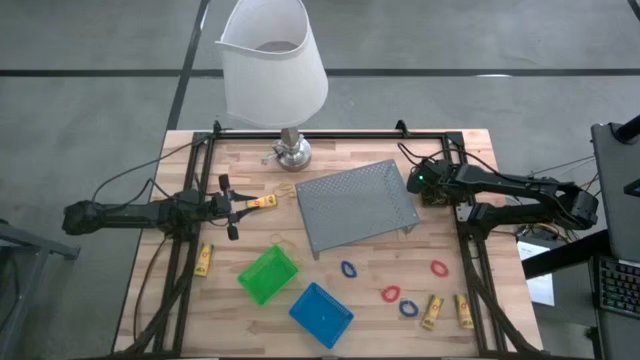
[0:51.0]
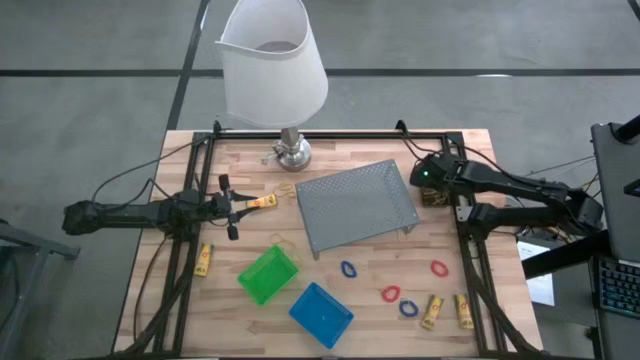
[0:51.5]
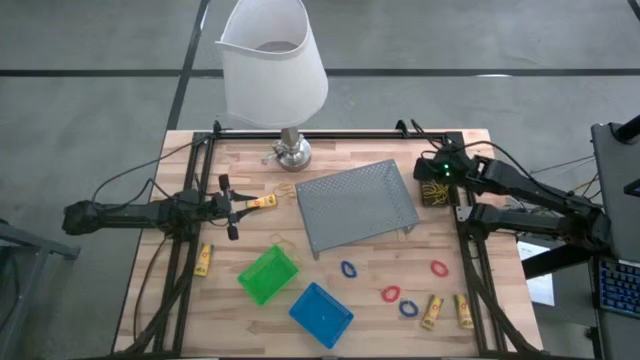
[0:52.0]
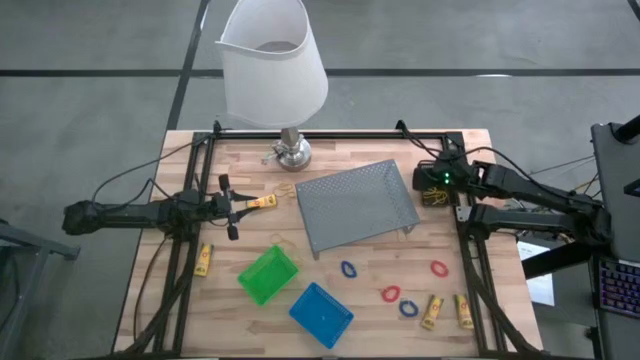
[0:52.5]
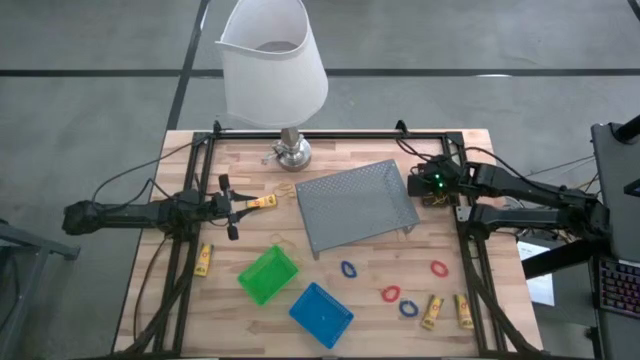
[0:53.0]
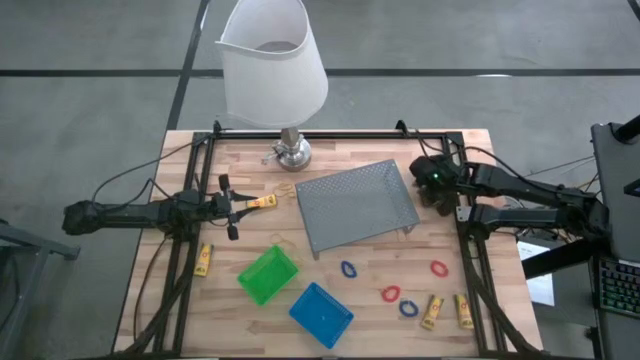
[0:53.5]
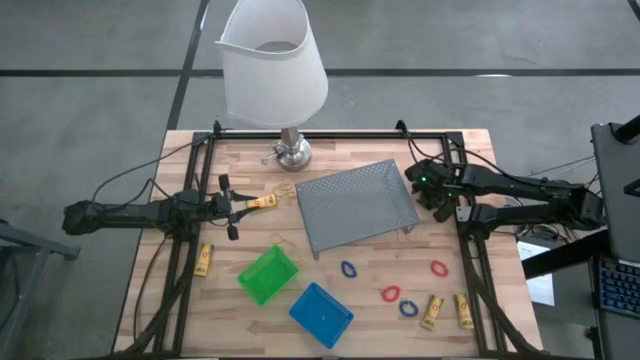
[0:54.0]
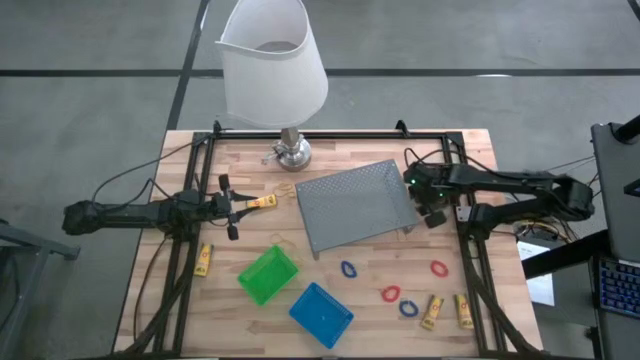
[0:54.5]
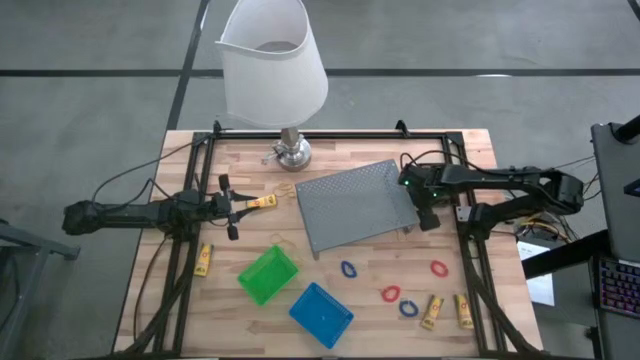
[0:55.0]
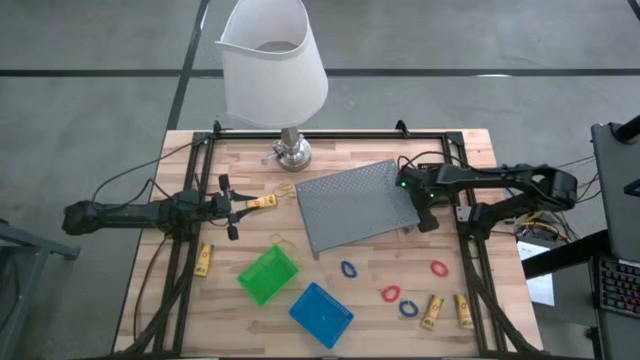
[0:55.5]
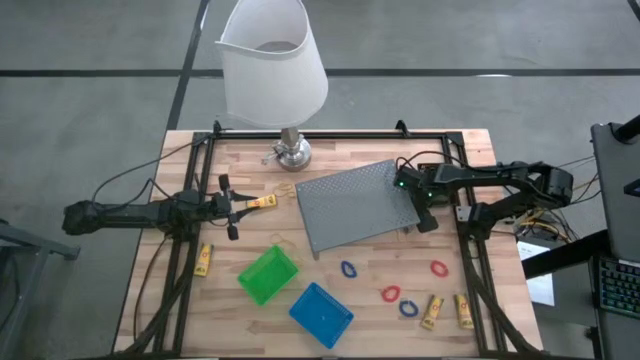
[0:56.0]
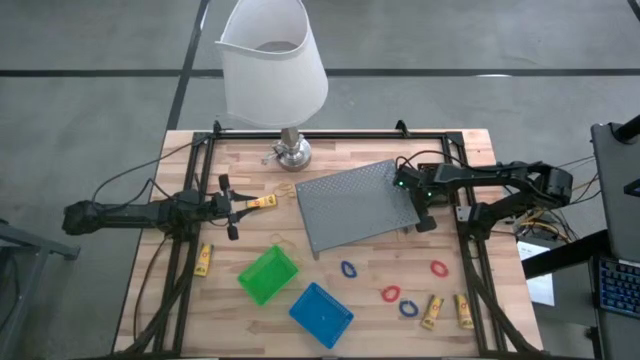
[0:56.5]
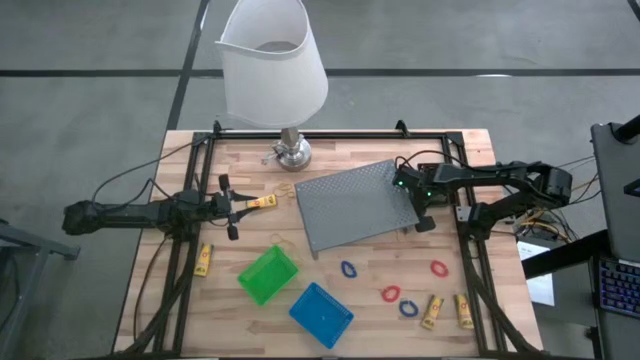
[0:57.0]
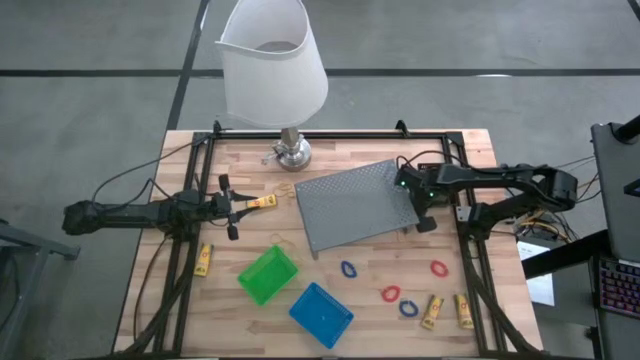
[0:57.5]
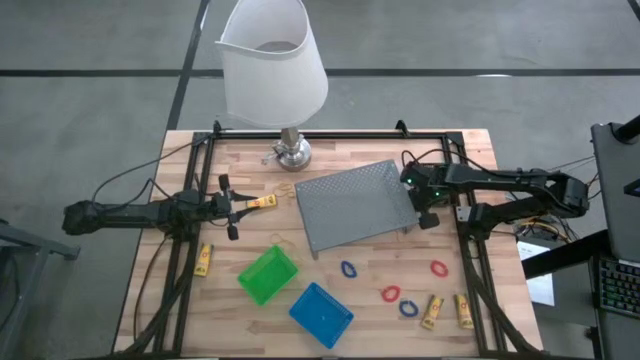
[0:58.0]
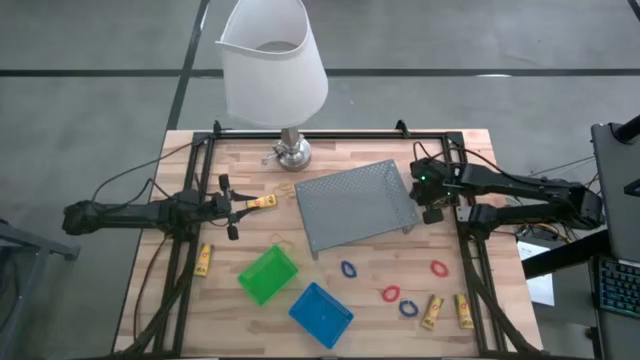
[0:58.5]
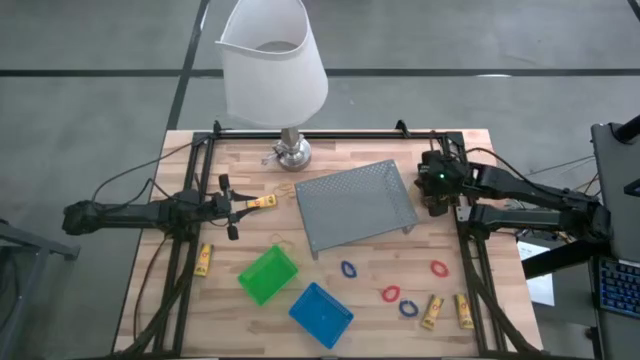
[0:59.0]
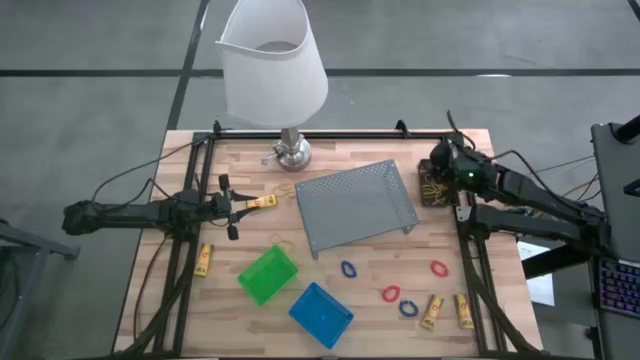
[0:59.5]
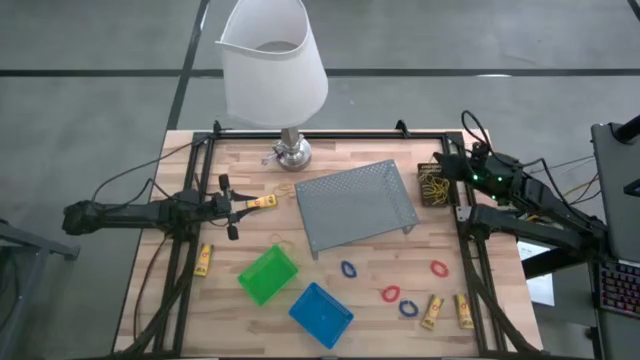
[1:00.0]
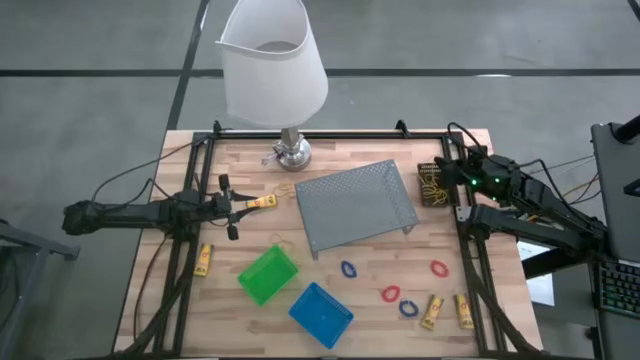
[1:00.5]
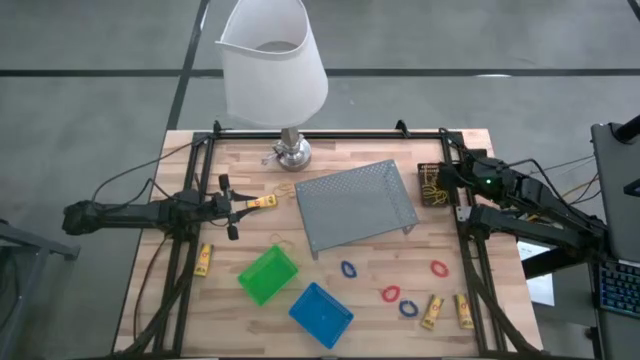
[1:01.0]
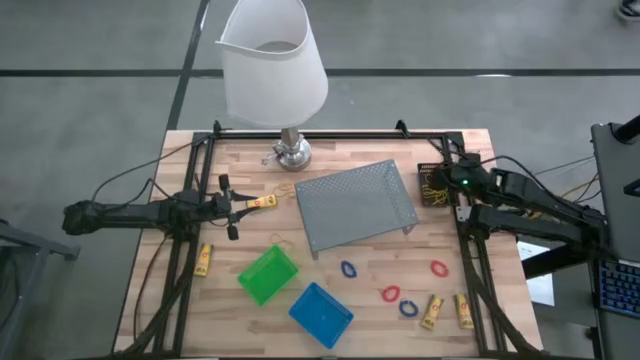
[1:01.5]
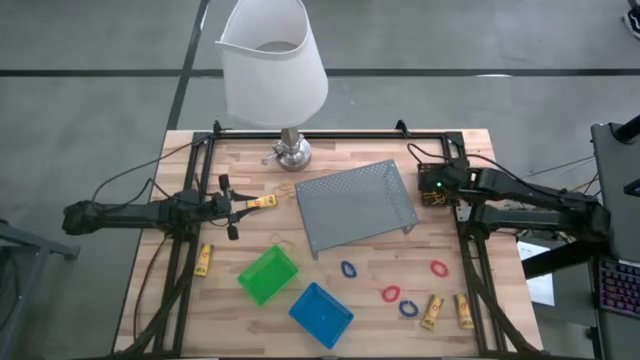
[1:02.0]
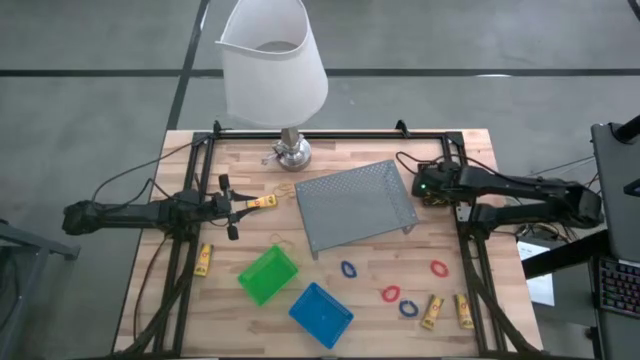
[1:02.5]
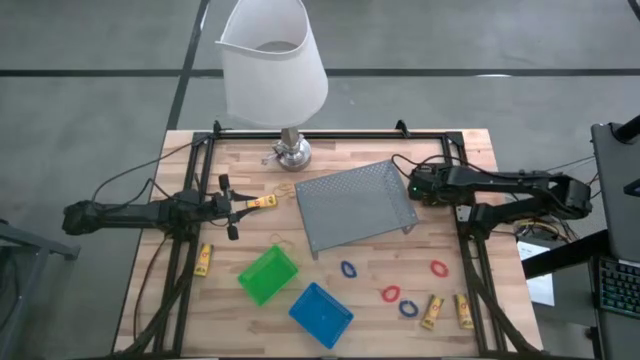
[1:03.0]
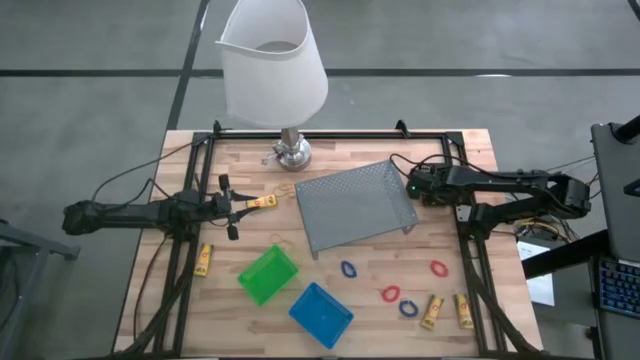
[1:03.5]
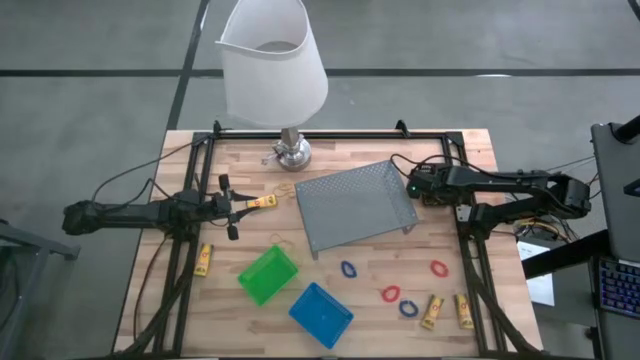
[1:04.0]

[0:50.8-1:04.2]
Task: Pick & Place Office Desk Supplies
Put the yellow rubber band into the black basket

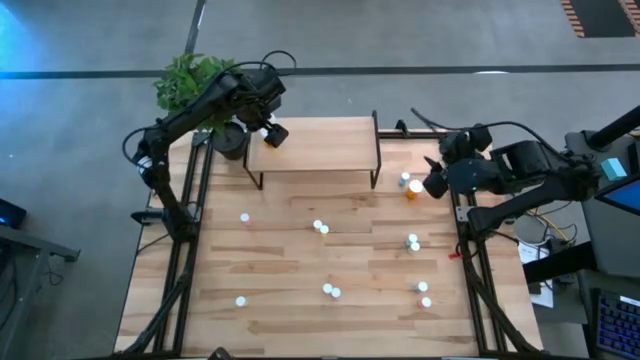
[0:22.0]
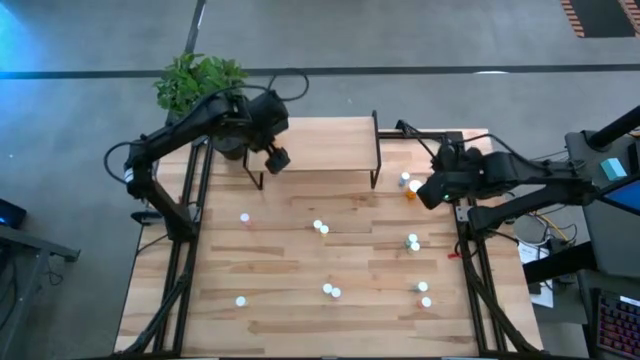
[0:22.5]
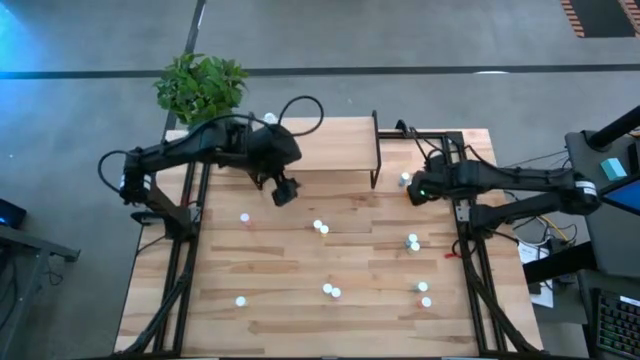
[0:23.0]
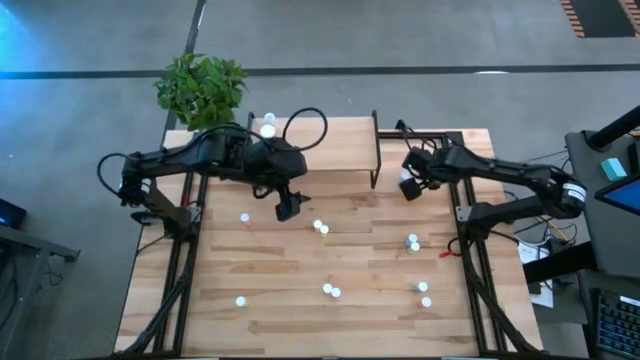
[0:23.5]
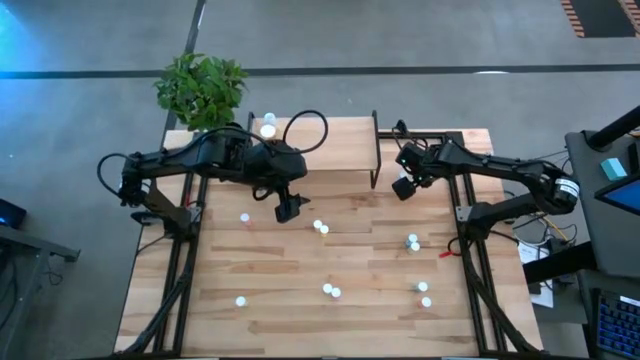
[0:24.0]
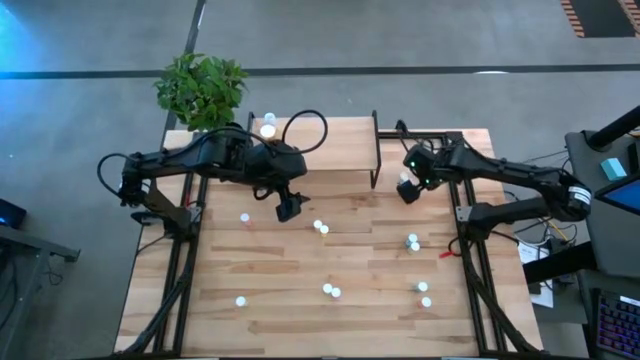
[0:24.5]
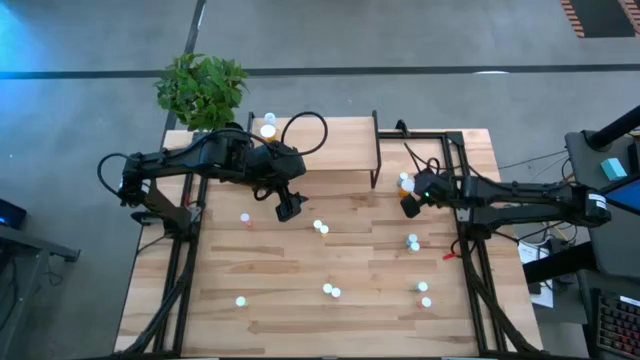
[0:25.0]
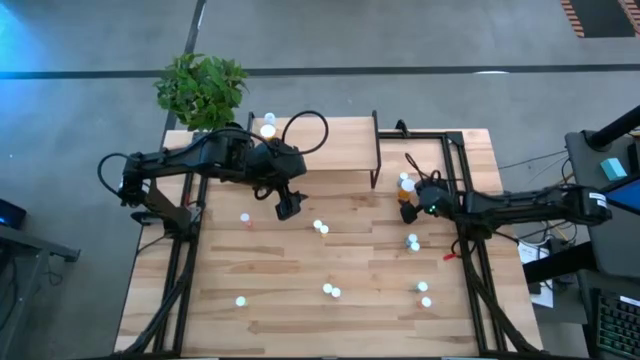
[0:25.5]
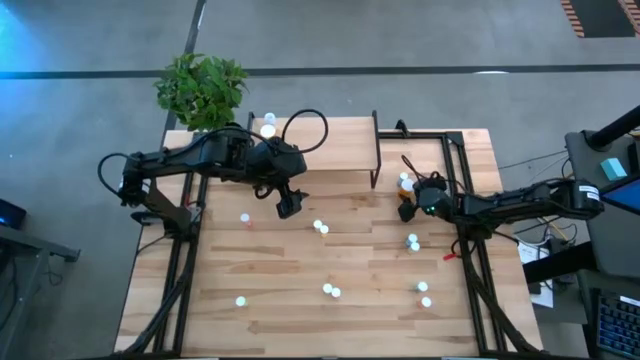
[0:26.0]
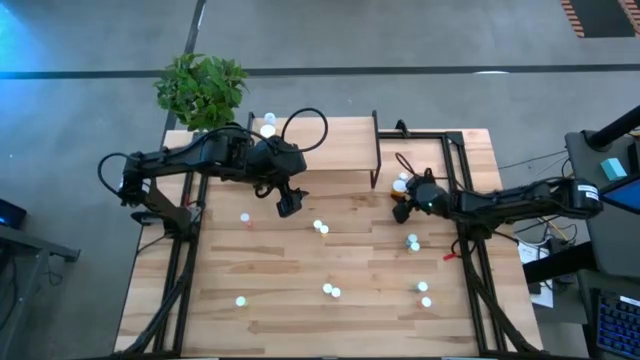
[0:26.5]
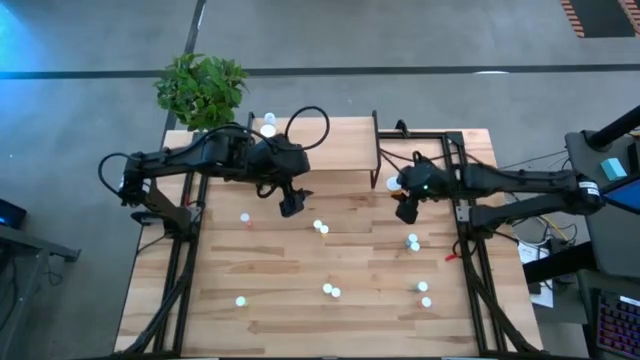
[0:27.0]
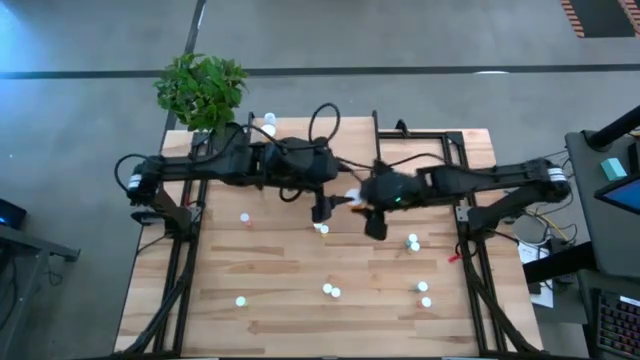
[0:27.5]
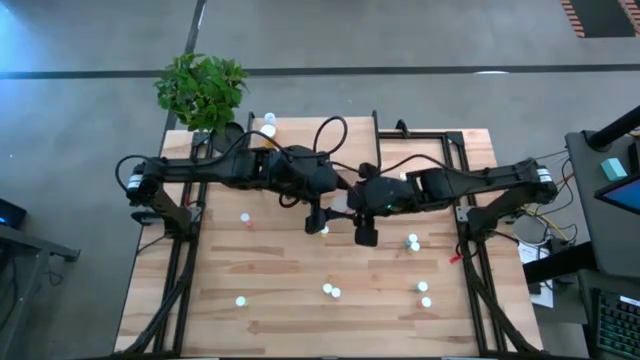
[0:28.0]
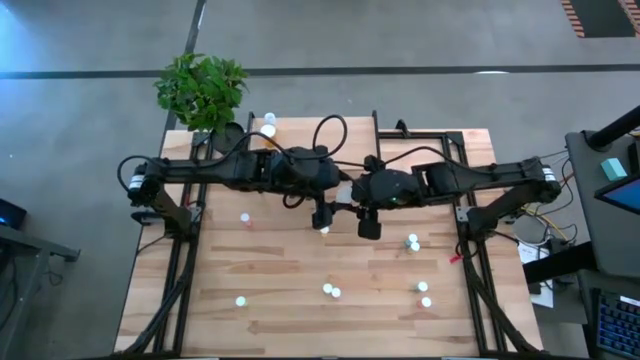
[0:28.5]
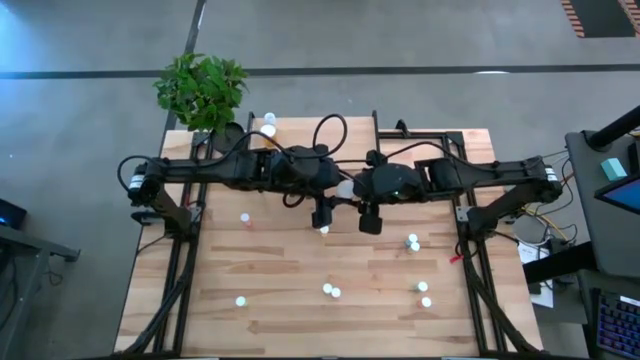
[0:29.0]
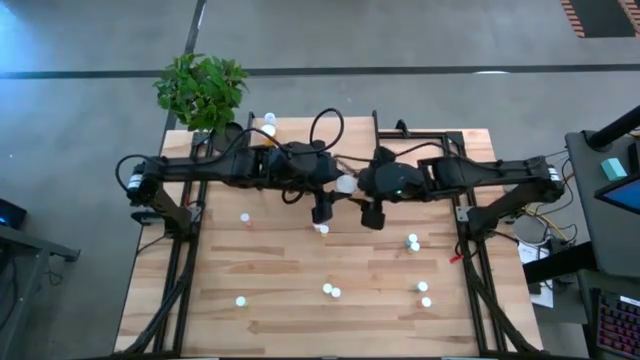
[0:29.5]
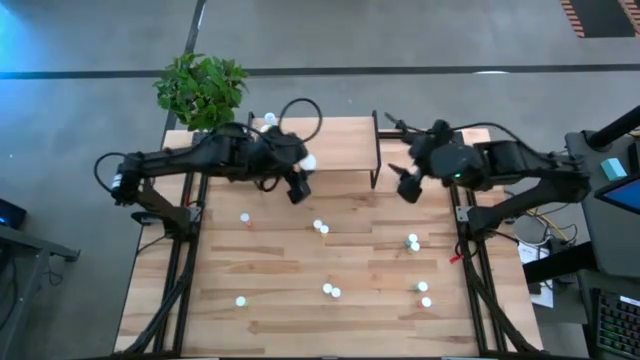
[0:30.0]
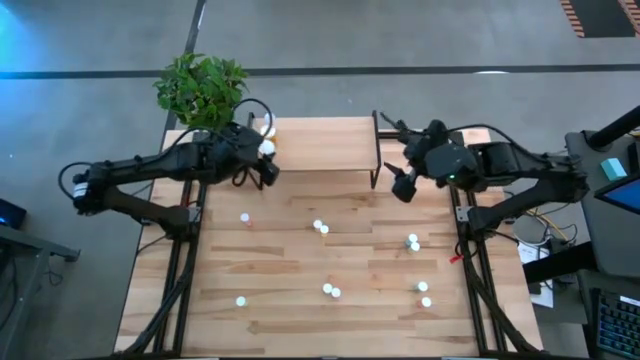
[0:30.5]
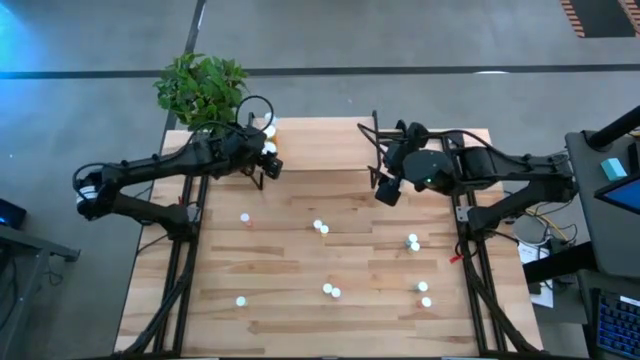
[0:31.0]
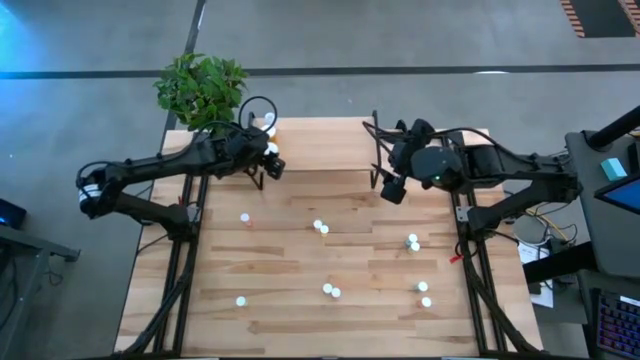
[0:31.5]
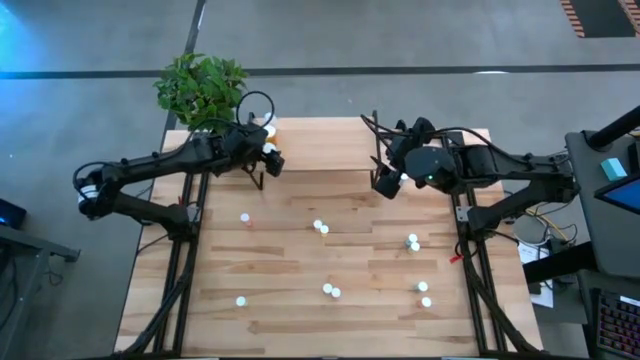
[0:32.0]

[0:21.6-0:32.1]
Task: Pick and place medicine bottles onto shelf by color
Put the orange pill bottle on the shelf
